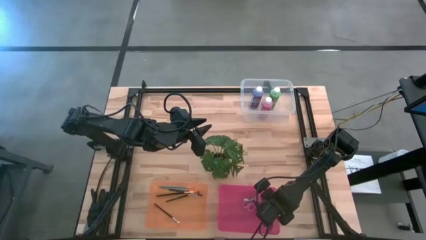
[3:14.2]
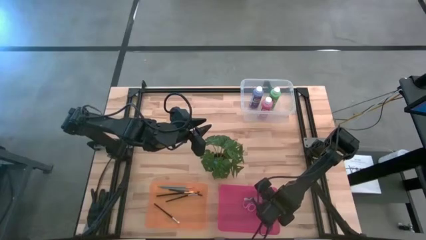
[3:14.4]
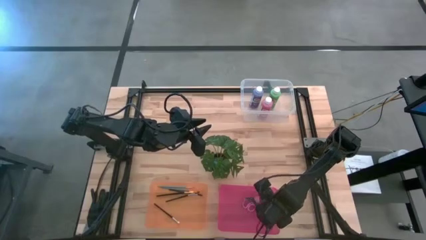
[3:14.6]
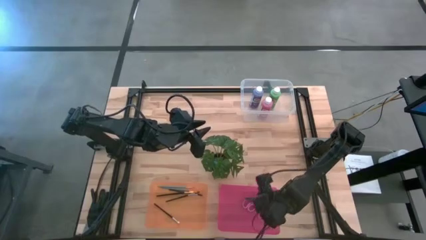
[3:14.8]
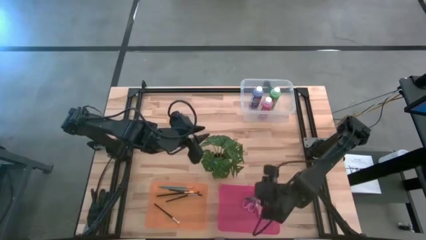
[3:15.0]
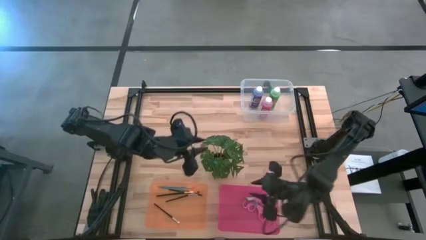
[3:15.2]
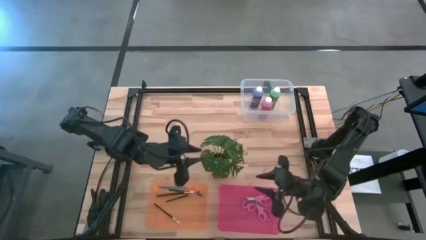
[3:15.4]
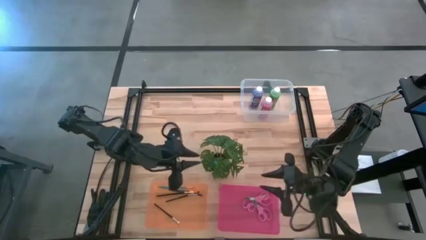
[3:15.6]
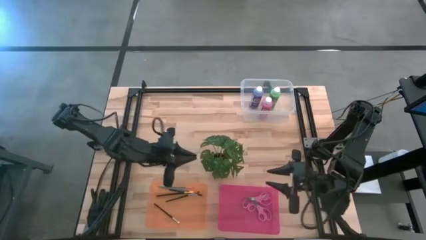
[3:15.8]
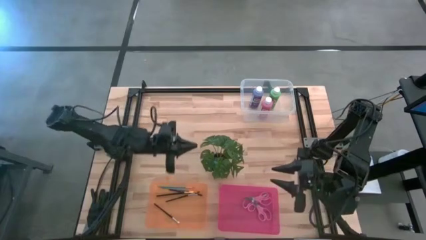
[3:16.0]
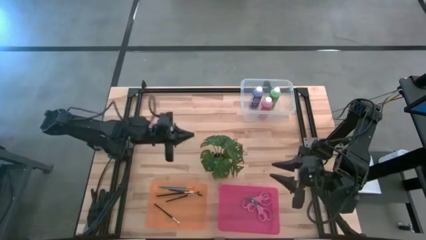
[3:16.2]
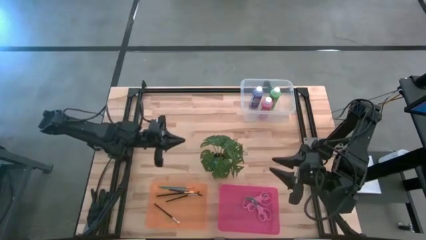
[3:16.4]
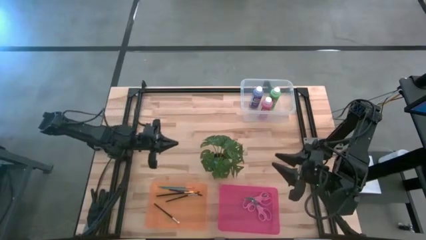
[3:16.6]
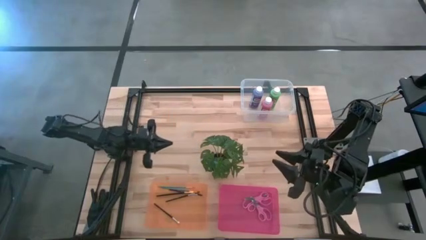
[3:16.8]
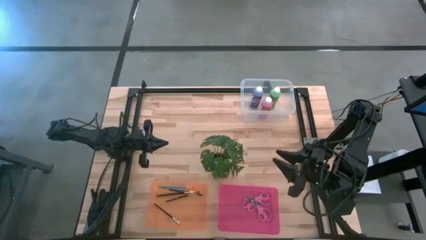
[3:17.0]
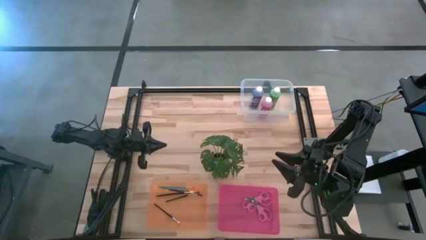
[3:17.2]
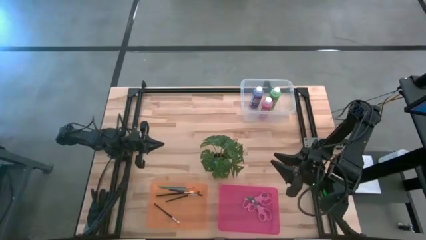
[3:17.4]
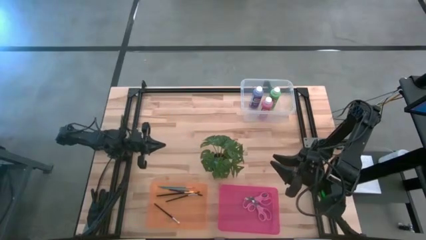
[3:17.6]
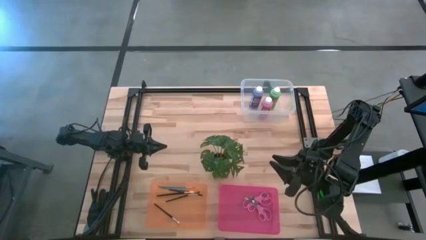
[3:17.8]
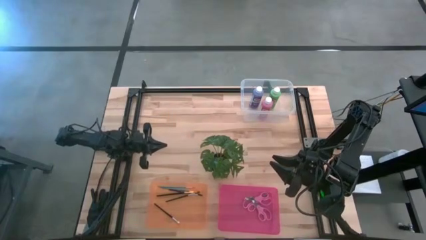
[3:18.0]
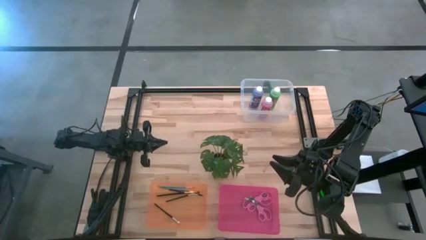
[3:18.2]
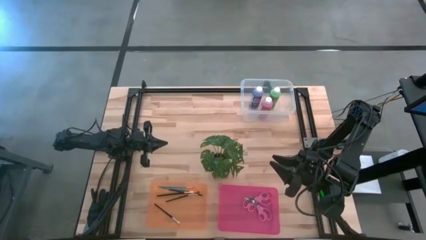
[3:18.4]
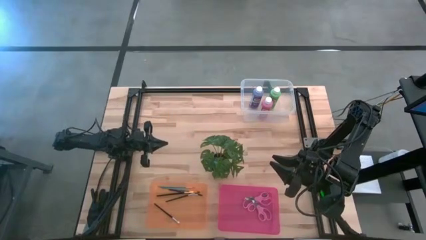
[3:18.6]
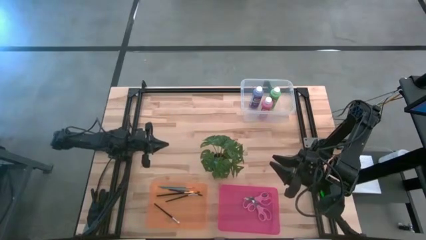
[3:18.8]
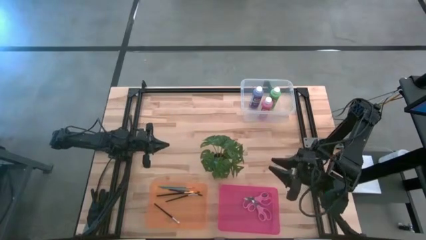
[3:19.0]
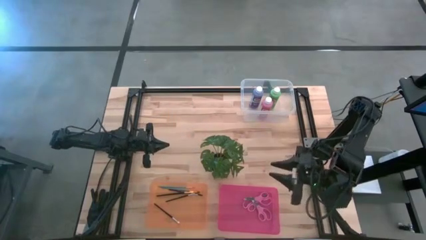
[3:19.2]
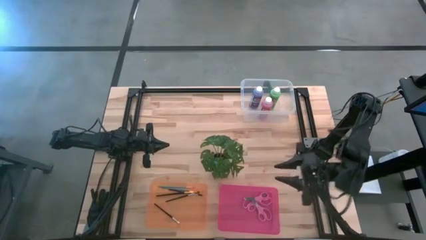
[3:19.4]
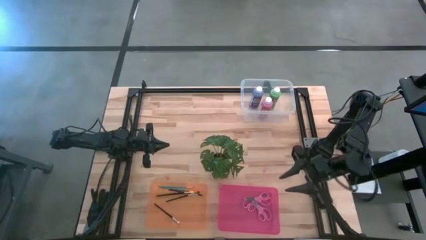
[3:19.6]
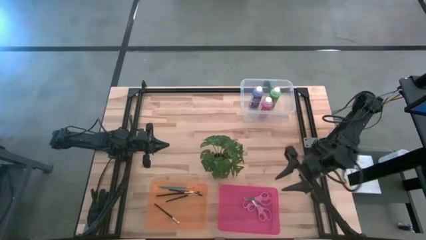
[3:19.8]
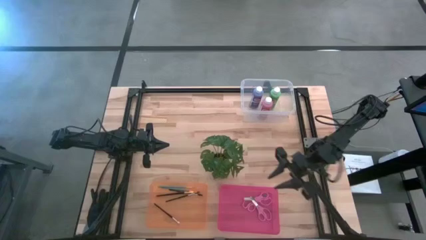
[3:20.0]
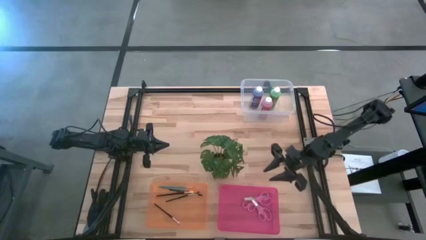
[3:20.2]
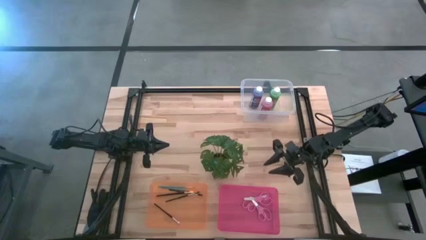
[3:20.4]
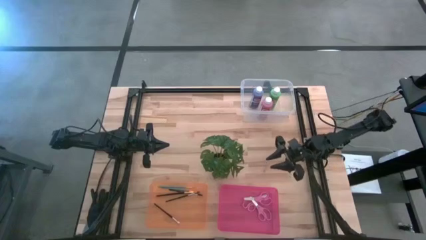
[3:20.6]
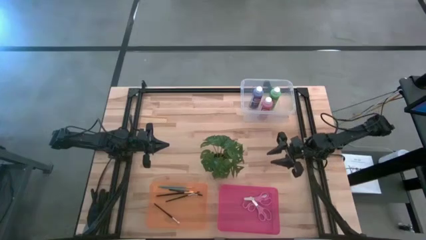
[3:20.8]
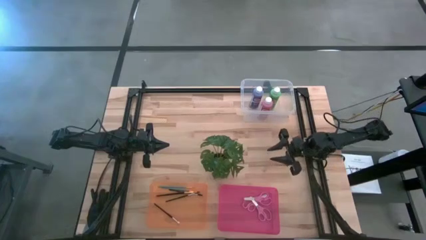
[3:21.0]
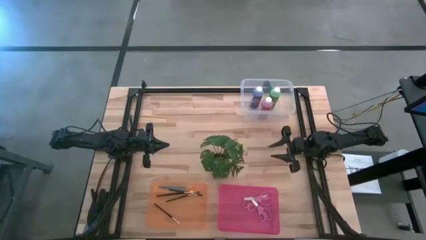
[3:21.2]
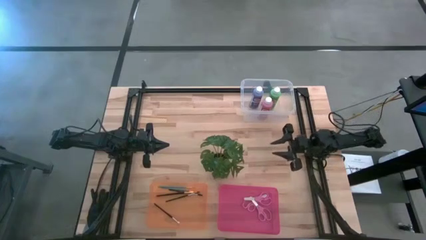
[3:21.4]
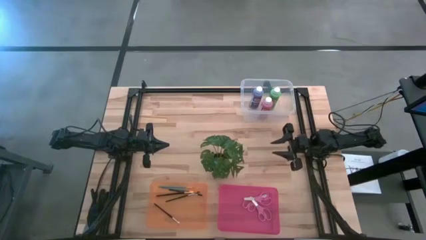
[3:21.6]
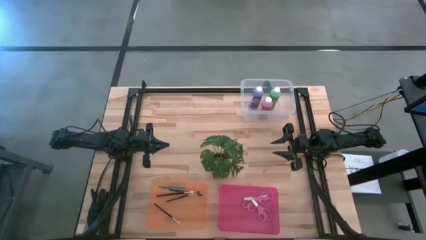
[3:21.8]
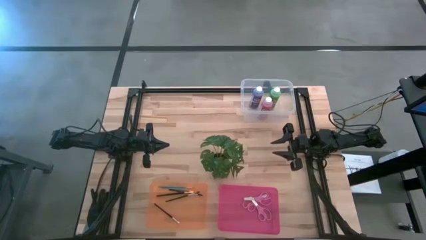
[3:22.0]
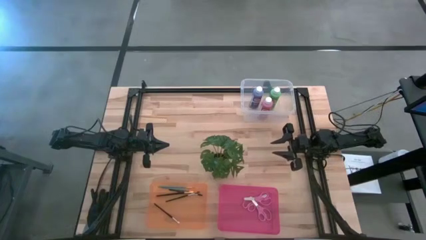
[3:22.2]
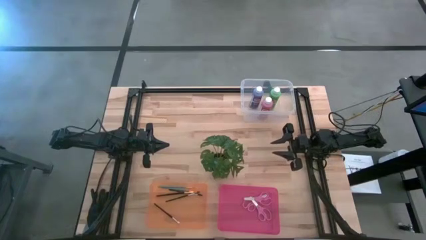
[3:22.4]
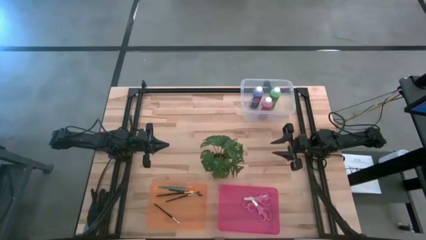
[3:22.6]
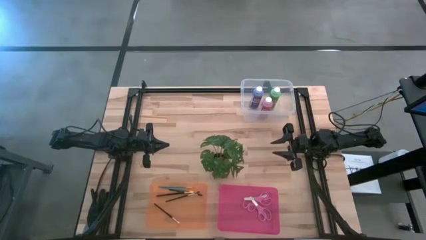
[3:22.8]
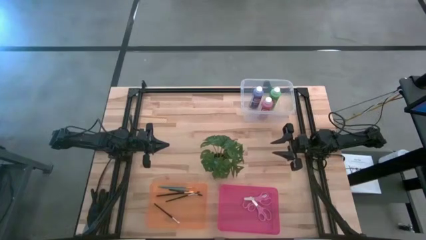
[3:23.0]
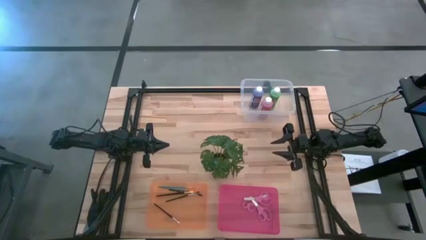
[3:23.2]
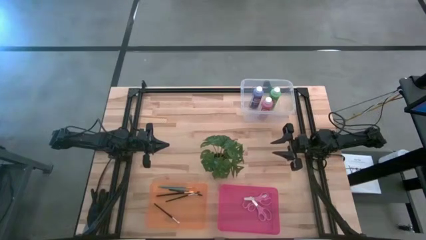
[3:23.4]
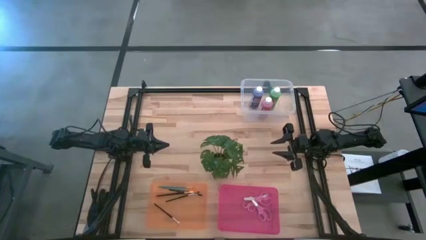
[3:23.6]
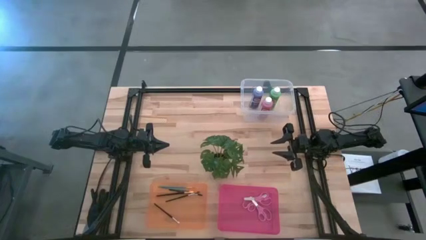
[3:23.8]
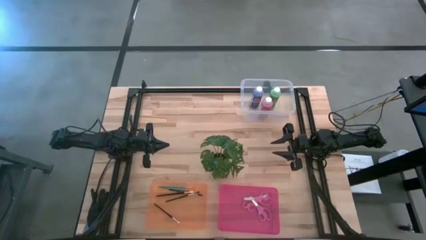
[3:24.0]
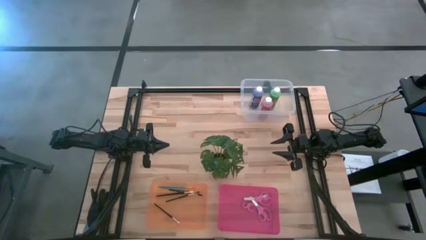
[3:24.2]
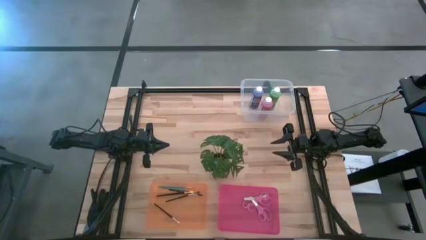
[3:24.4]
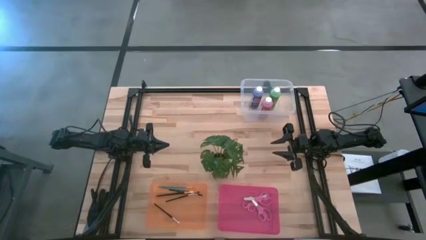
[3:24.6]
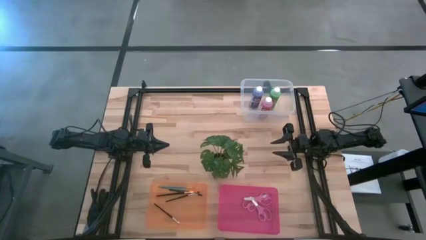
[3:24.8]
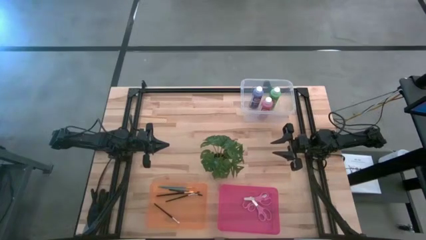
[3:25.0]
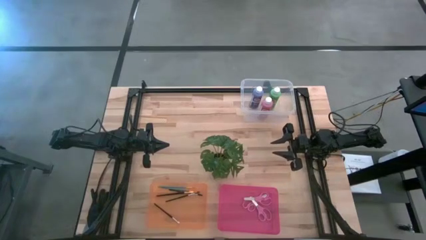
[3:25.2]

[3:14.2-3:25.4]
Task: Pick & Place Paint Supplies
Return to Home Position
